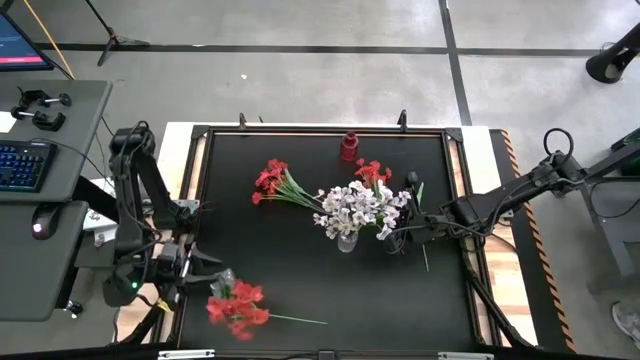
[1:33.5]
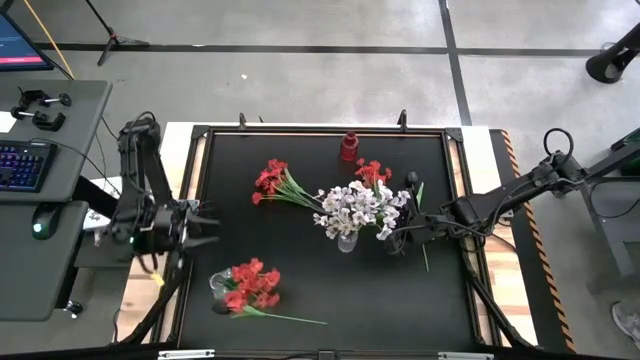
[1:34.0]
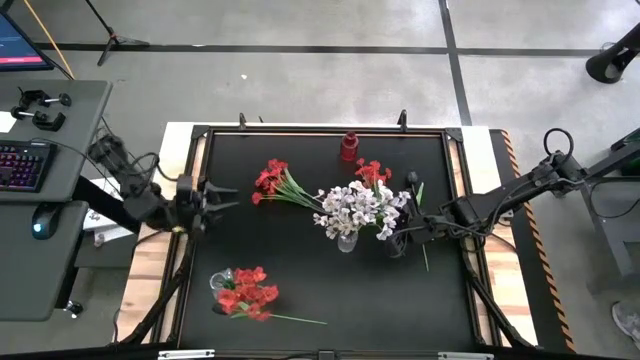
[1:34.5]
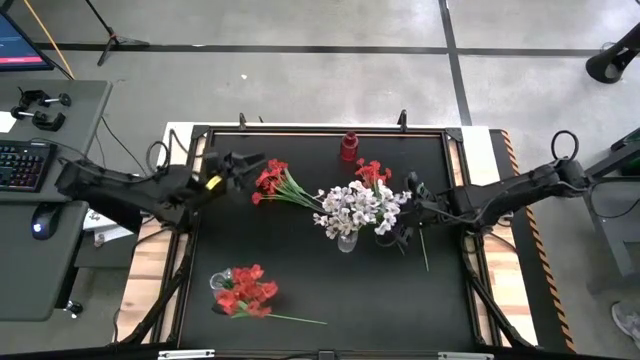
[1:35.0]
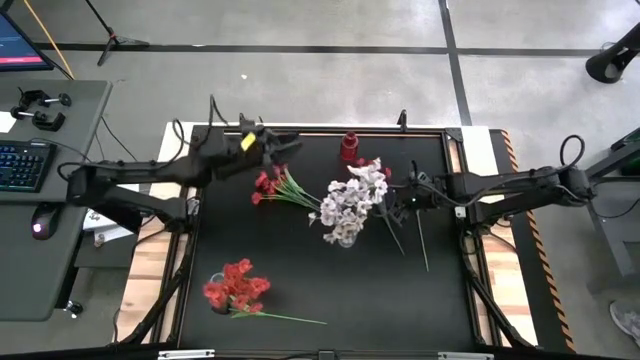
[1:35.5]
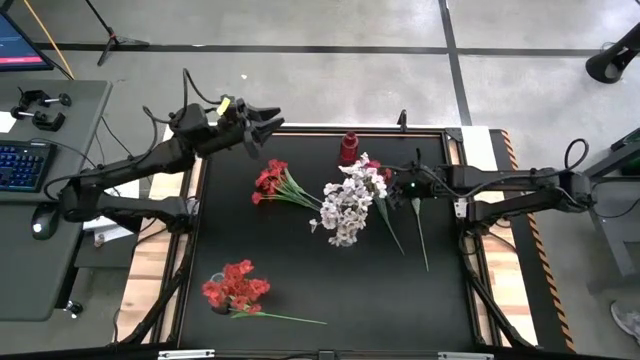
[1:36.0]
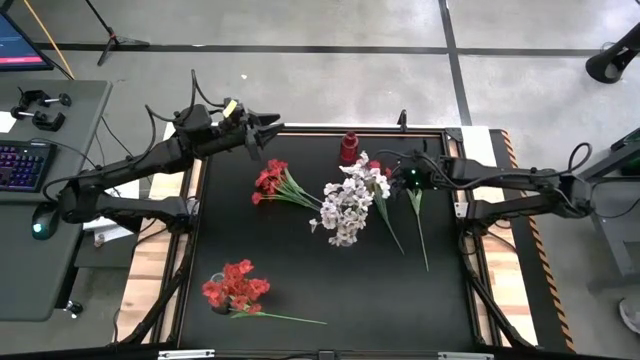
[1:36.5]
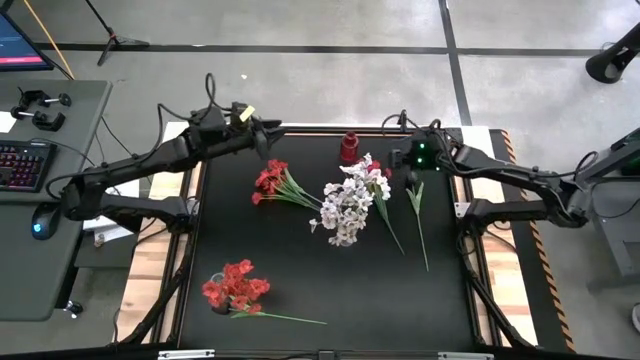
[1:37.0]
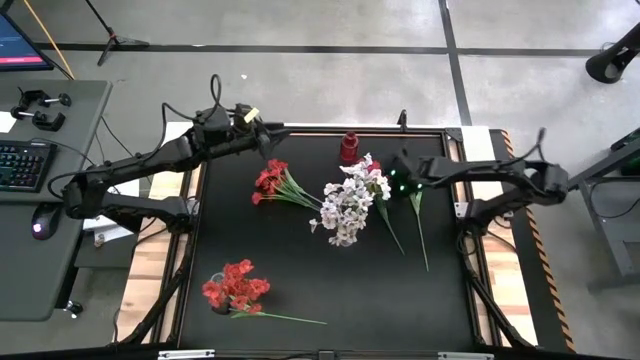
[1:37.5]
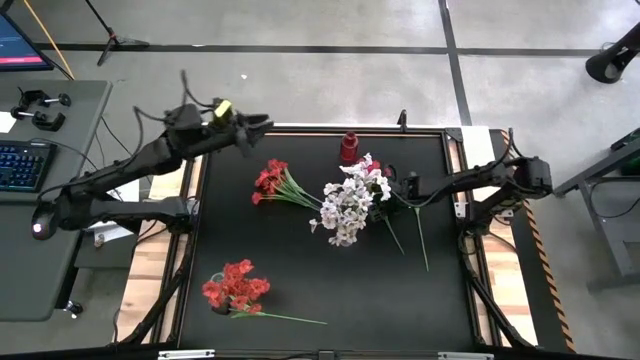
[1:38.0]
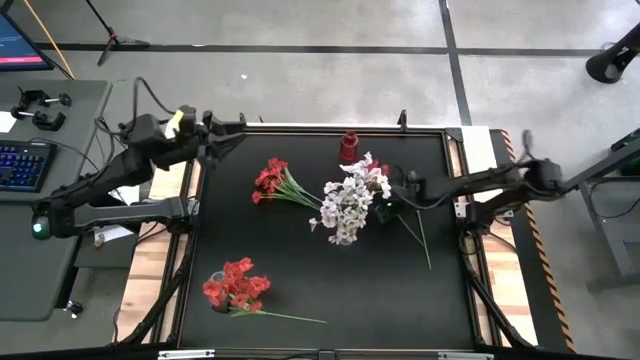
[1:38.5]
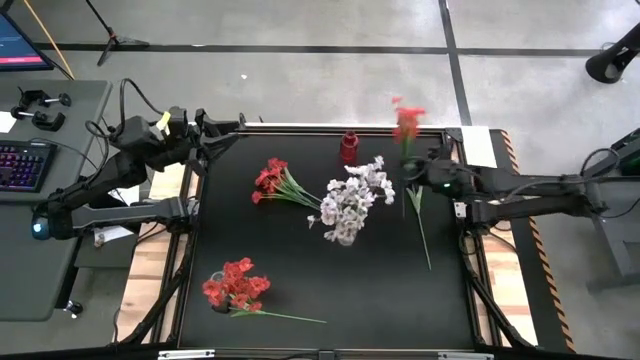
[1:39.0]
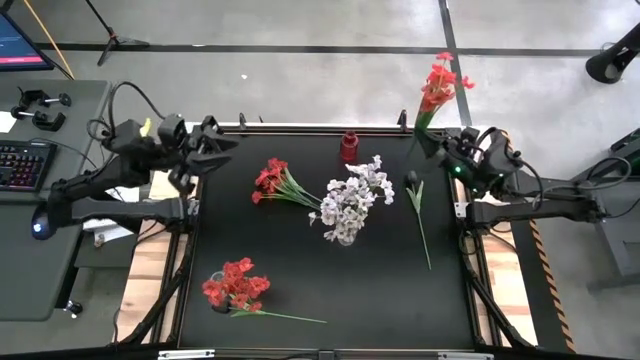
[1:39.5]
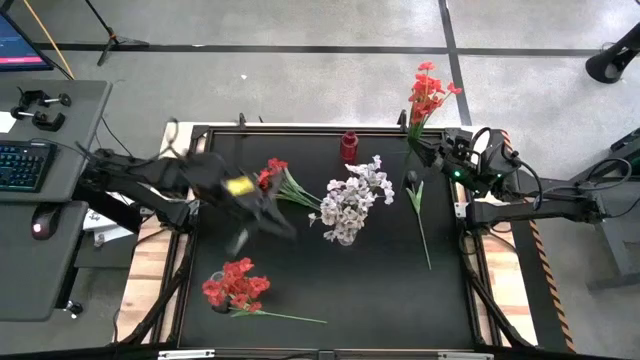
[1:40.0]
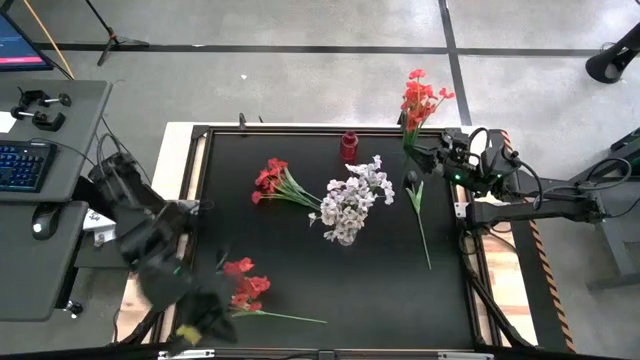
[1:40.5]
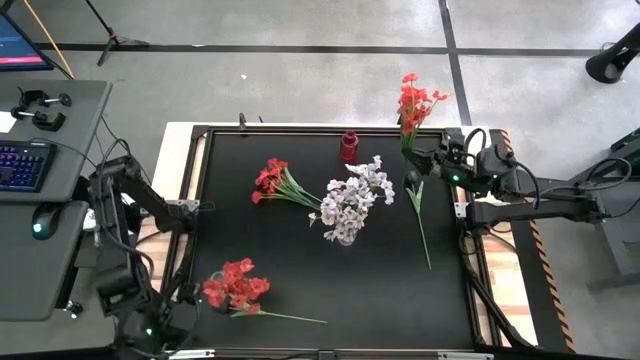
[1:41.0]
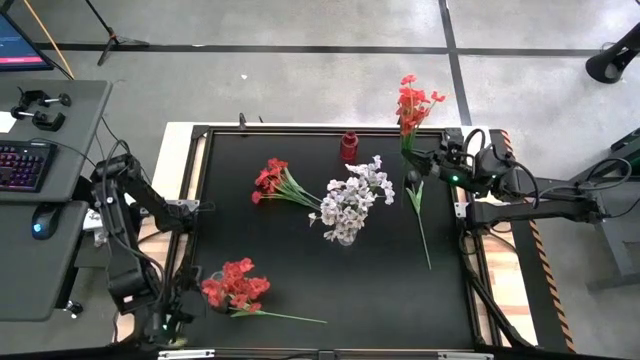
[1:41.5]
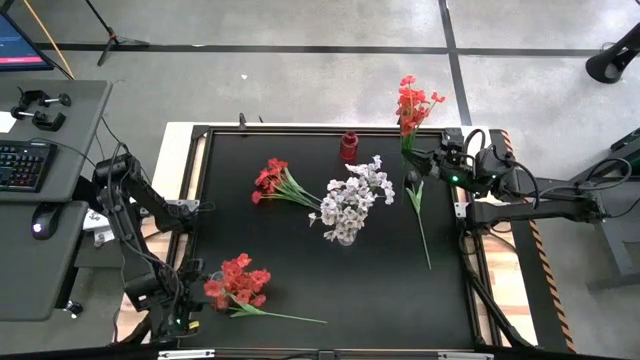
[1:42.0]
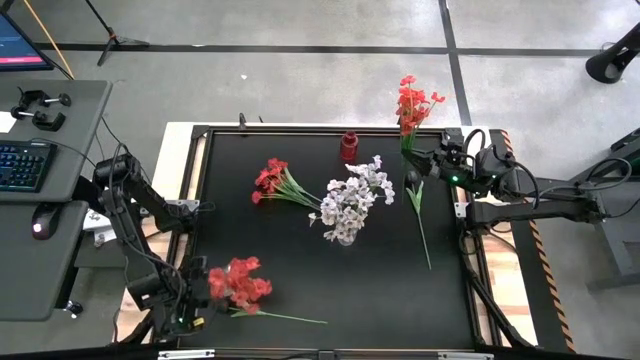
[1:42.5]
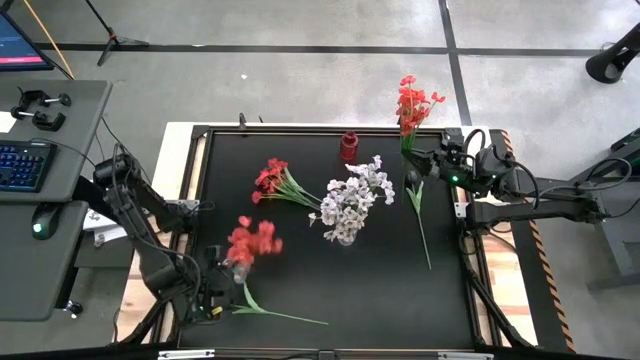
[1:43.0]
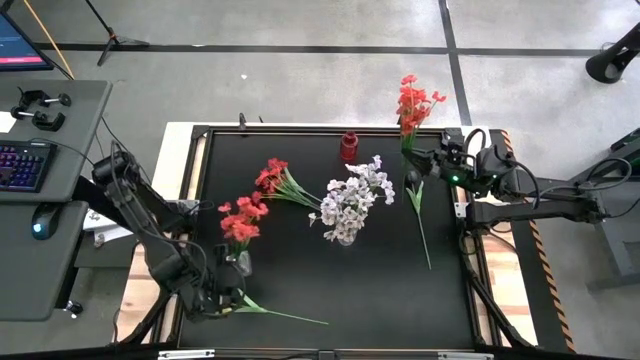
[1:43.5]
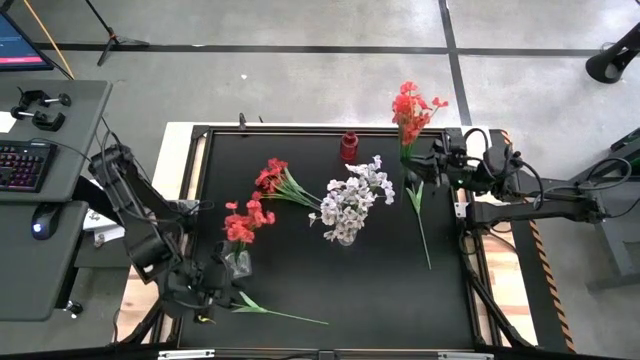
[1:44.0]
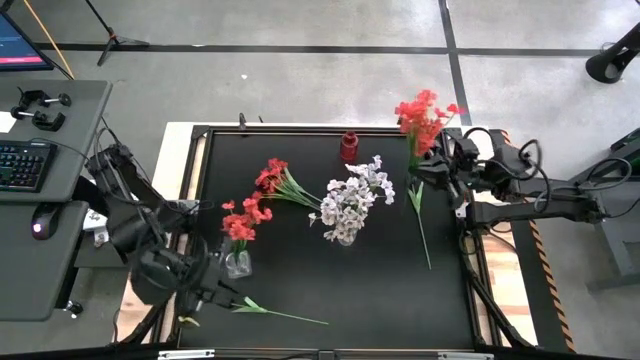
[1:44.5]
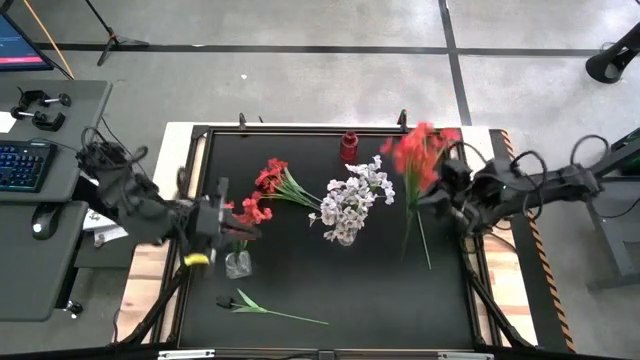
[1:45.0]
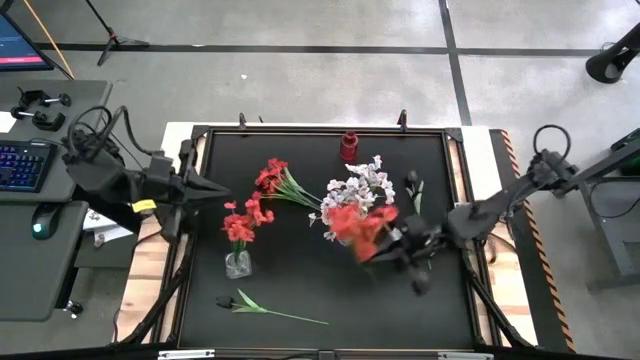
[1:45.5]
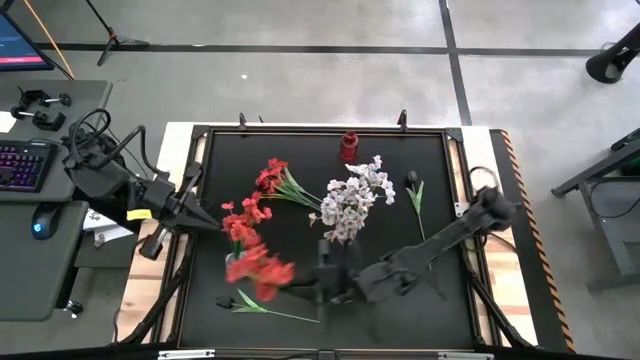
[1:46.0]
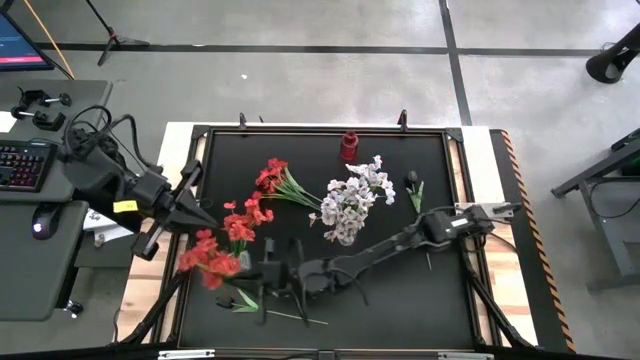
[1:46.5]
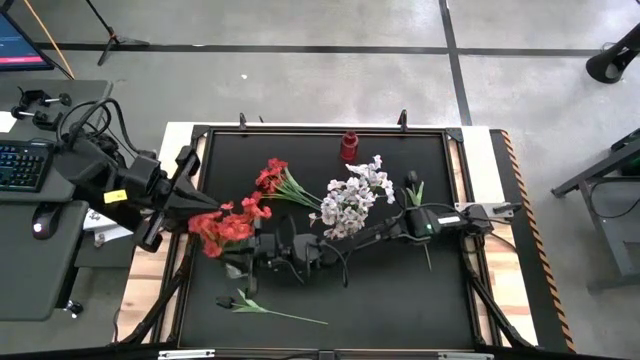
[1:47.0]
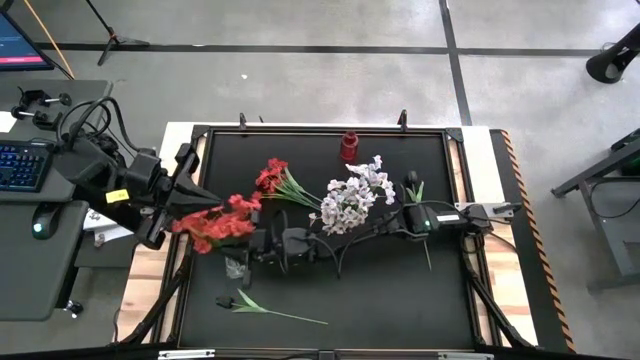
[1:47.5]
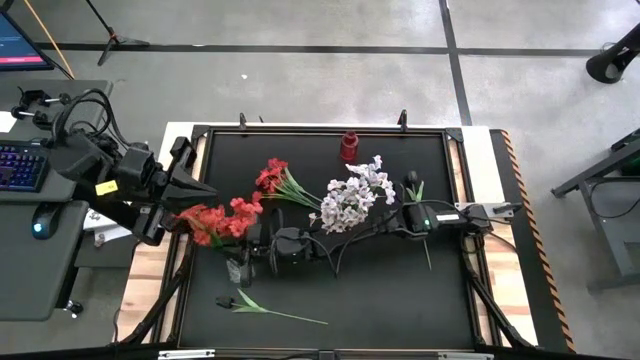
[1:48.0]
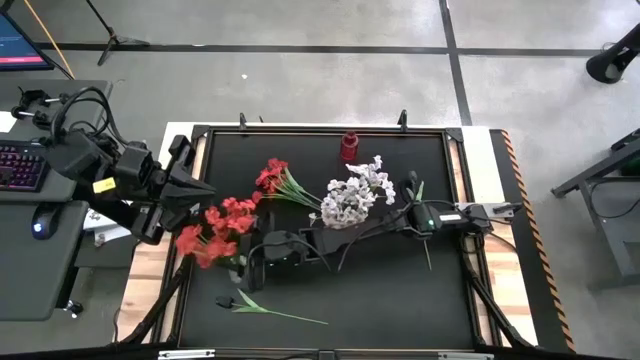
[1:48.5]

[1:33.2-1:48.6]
Task: Sort flowers into vase by color
Put the right red flowers into the left transparent vase

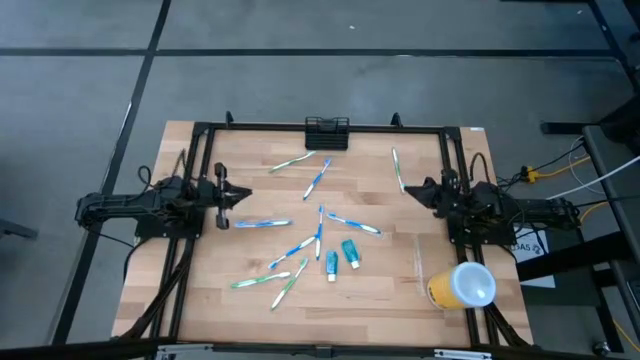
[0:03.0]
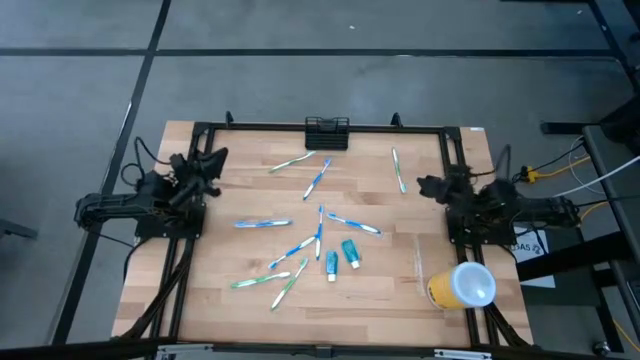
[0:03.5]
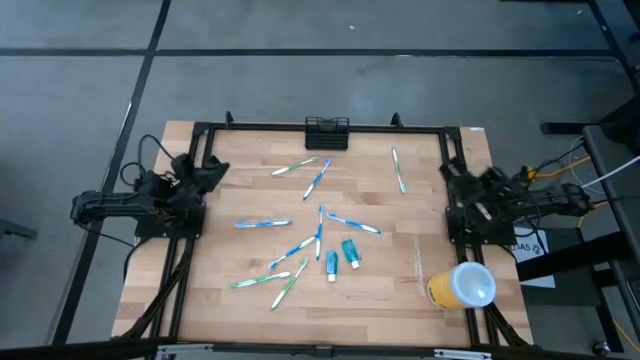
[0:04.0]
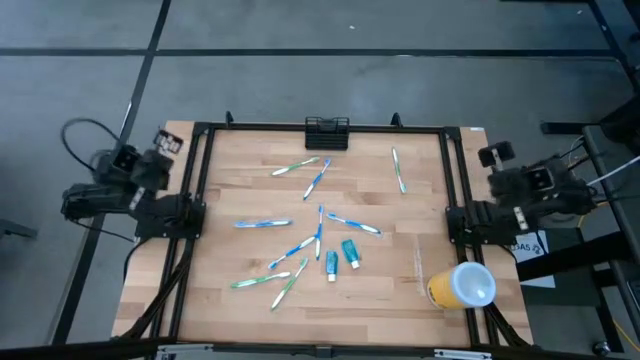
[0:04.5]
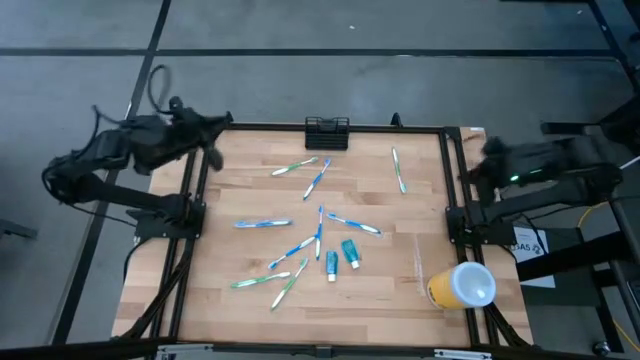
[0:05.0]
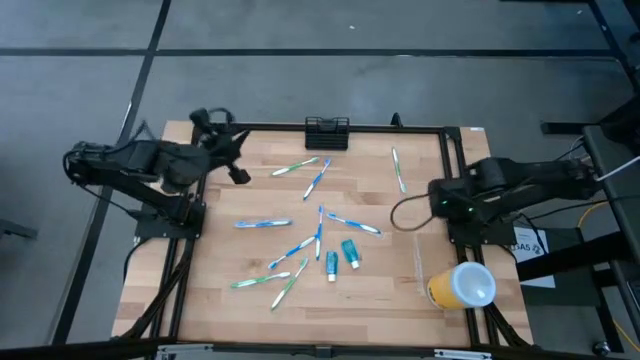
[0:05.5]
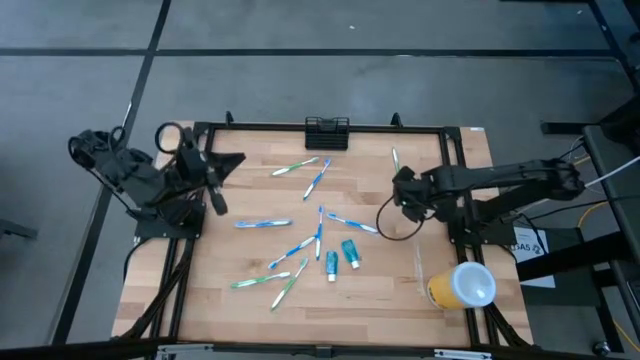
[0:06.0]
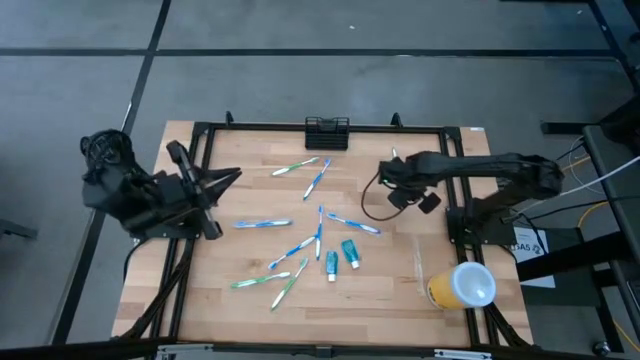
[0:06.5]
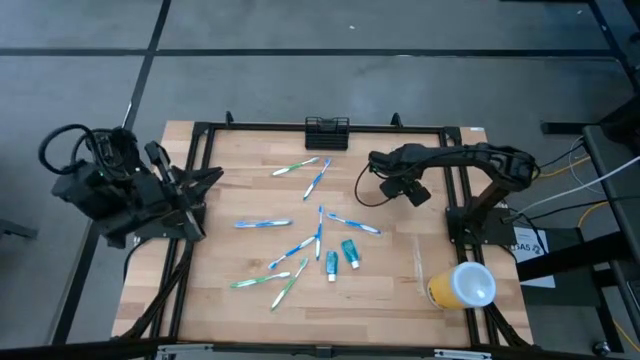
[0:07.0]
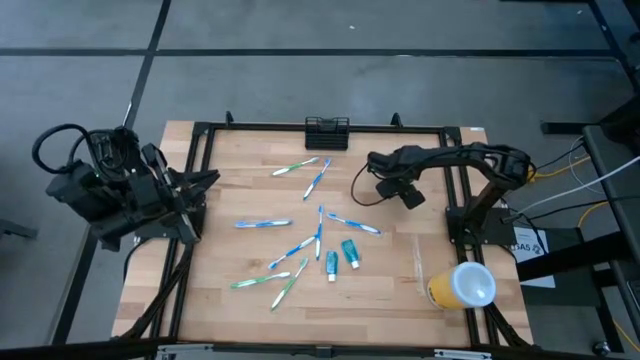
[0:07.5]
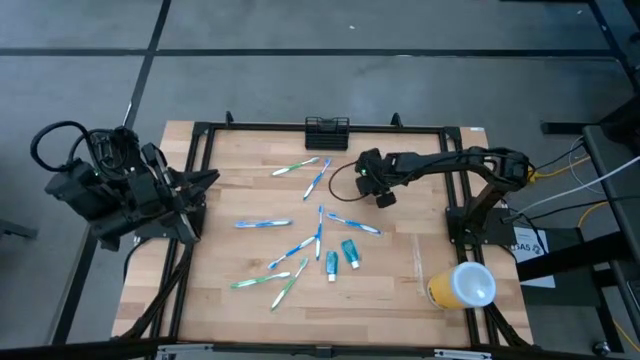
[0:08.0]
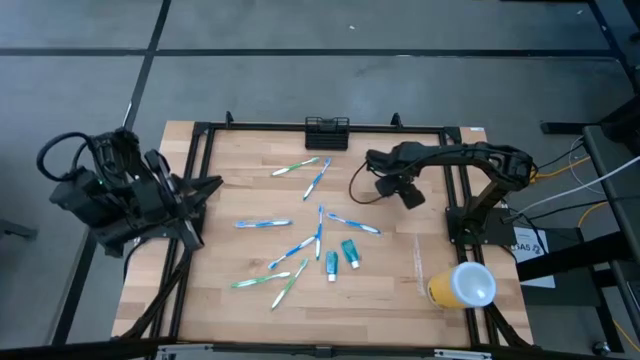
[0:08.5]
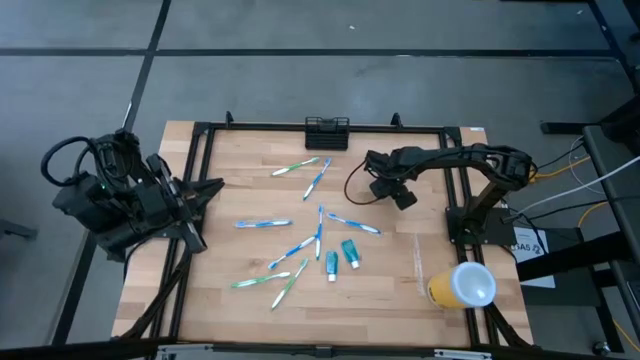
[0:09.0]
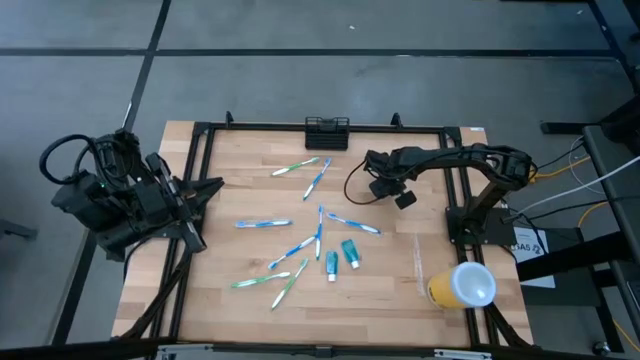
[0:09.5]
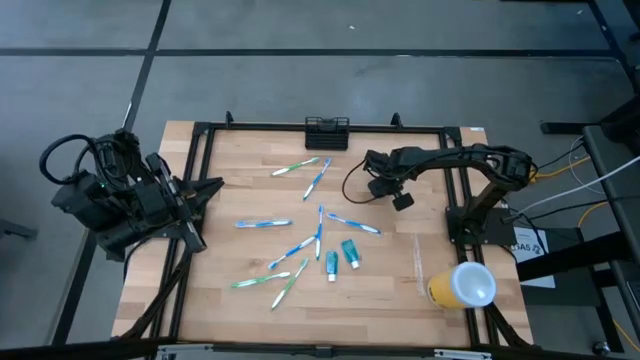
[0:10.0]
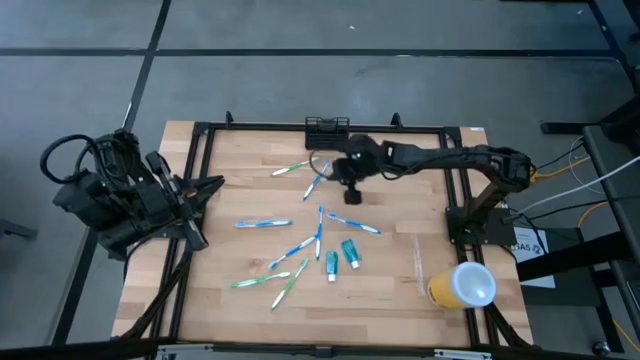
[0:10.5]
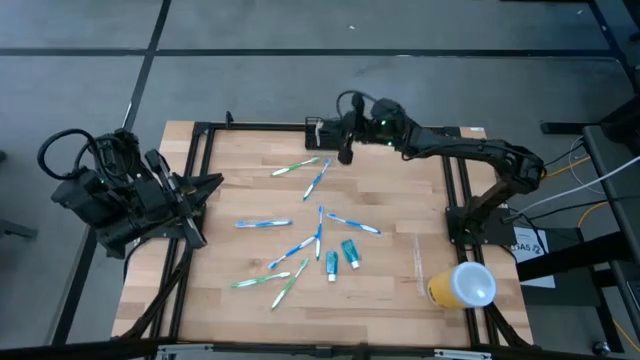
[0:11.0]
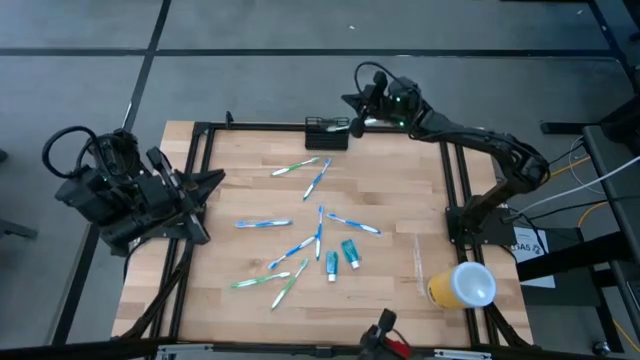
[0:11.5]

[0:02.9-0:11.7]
Task: Pick & Place toothbrushing station
Put the green toothbrush into the wire organizer
